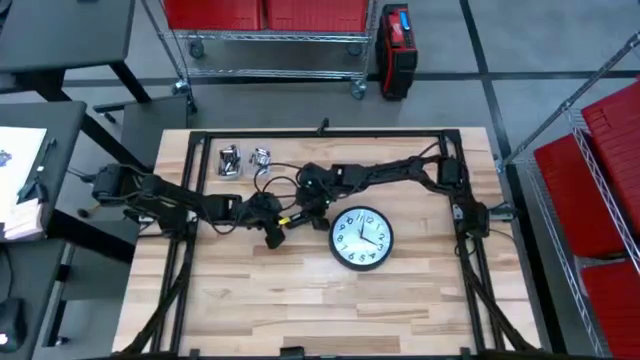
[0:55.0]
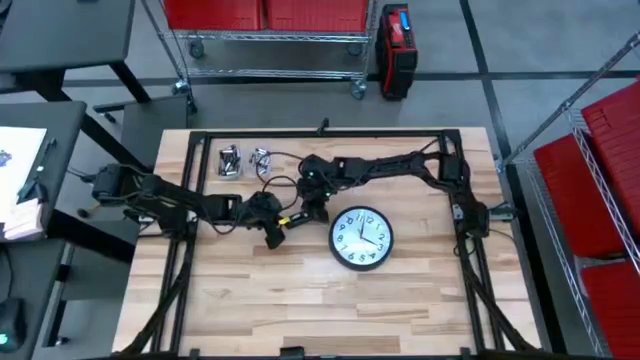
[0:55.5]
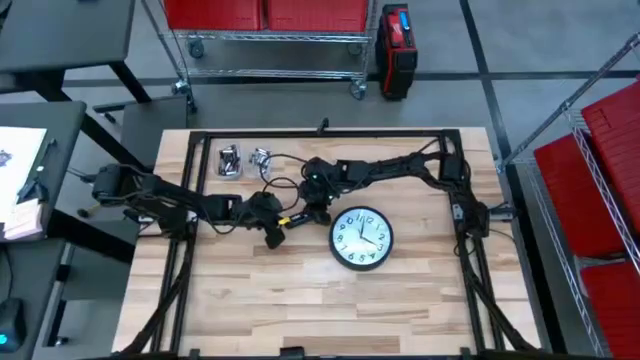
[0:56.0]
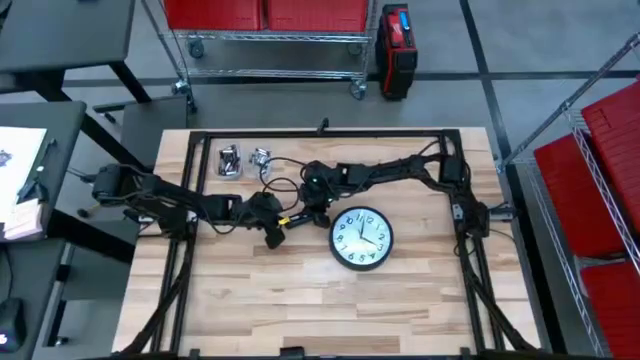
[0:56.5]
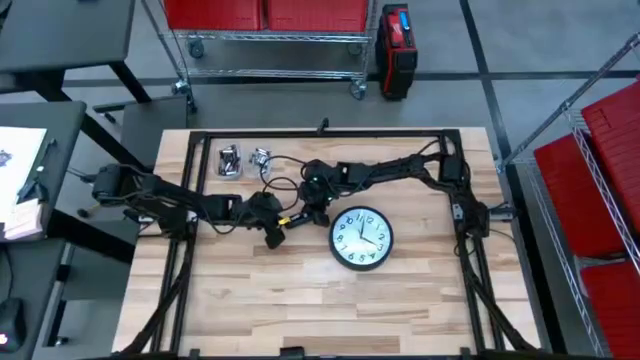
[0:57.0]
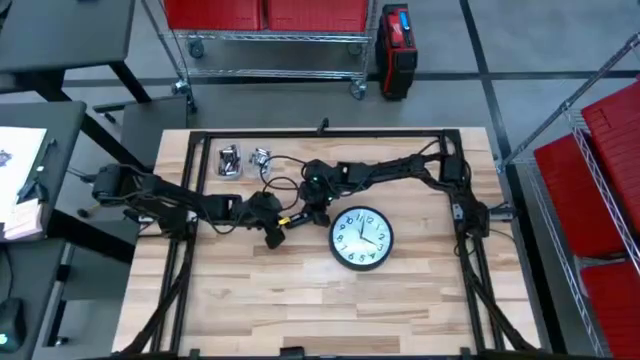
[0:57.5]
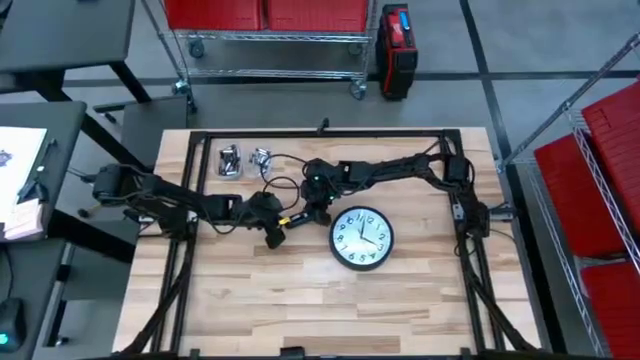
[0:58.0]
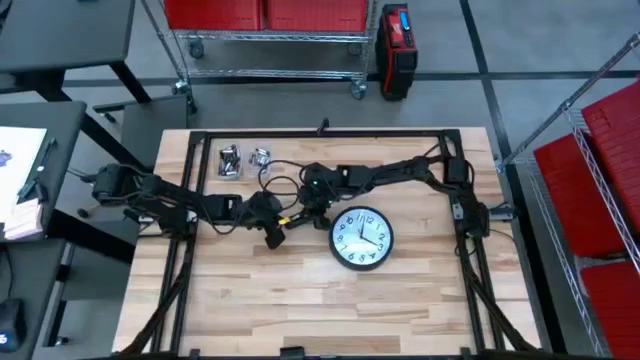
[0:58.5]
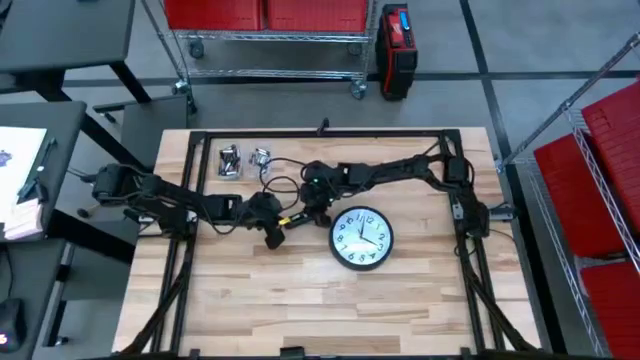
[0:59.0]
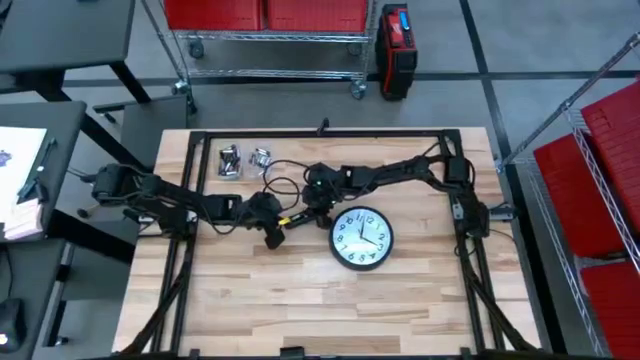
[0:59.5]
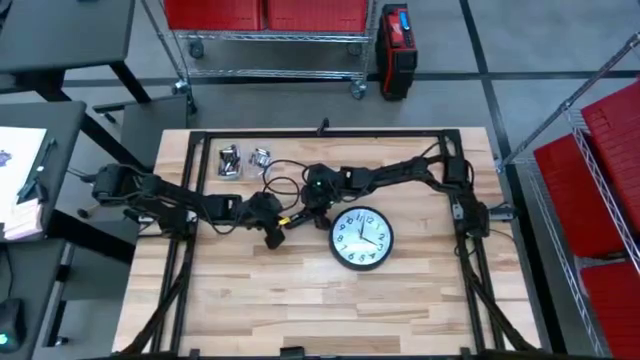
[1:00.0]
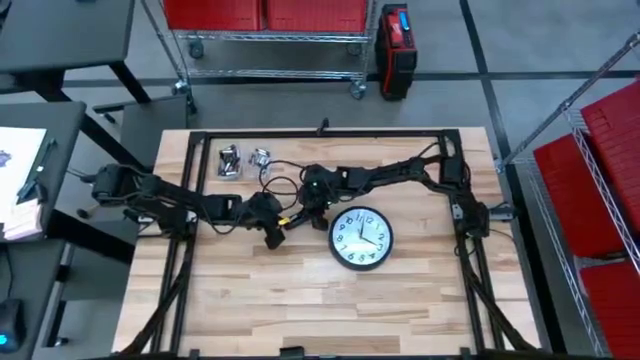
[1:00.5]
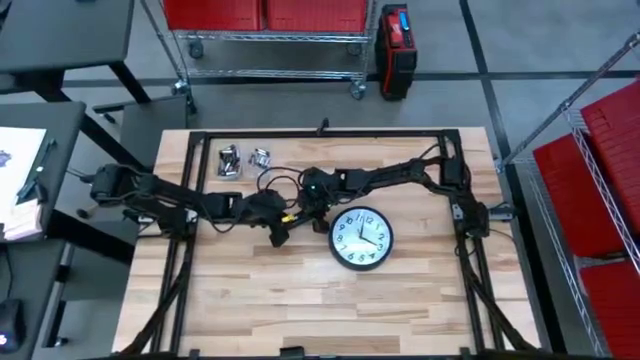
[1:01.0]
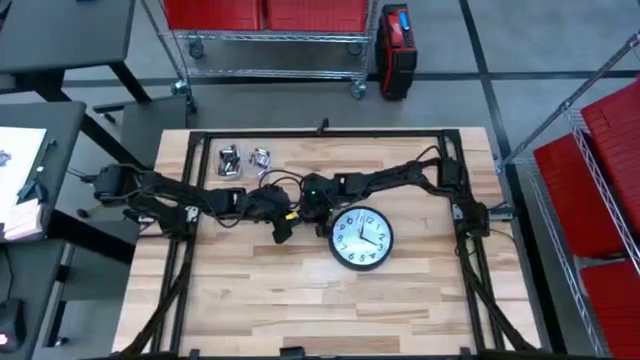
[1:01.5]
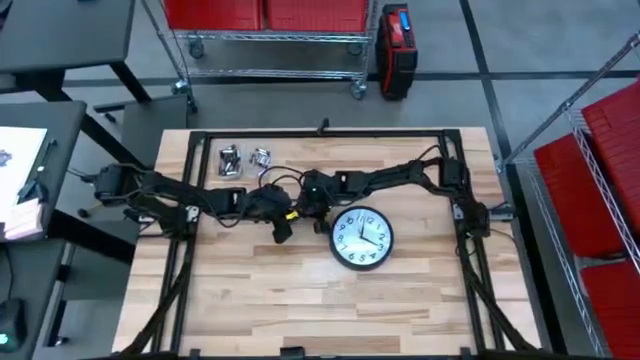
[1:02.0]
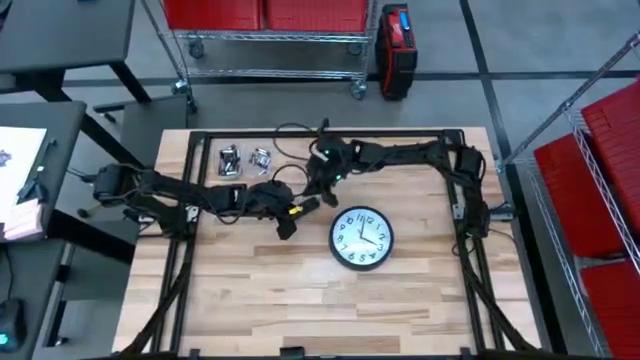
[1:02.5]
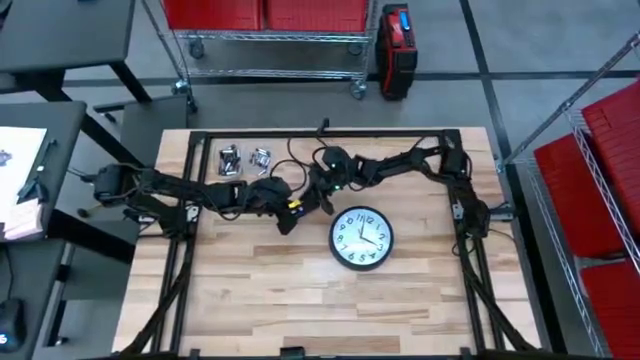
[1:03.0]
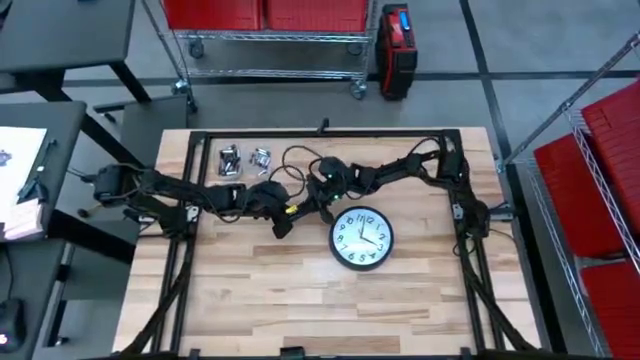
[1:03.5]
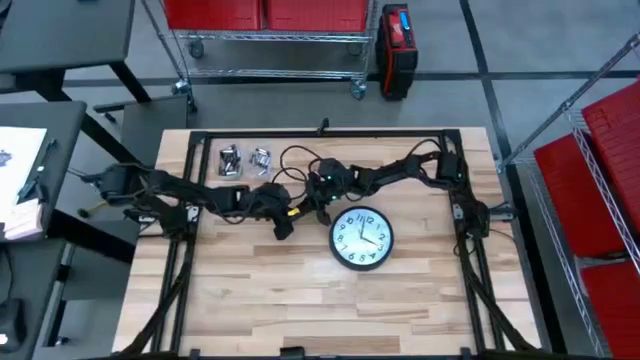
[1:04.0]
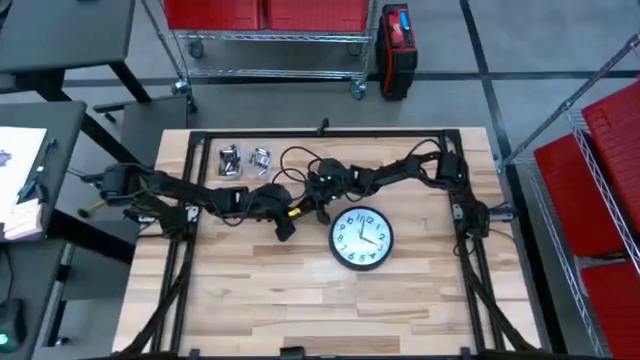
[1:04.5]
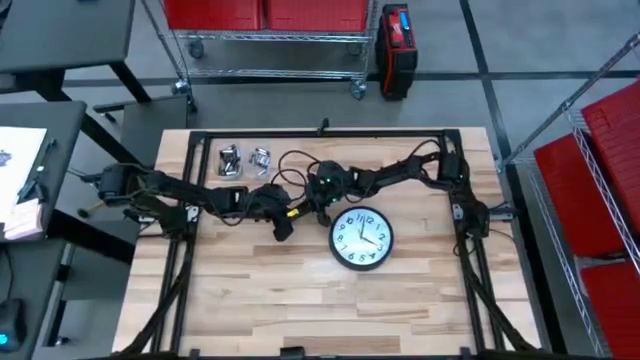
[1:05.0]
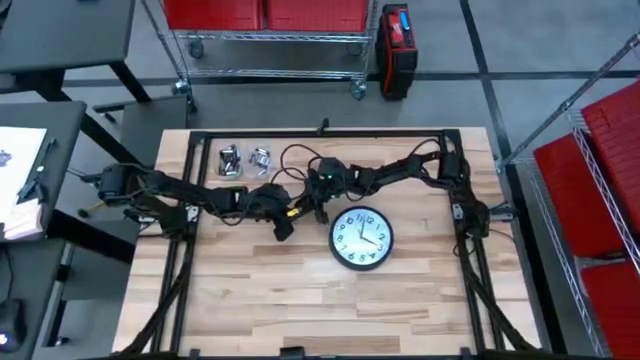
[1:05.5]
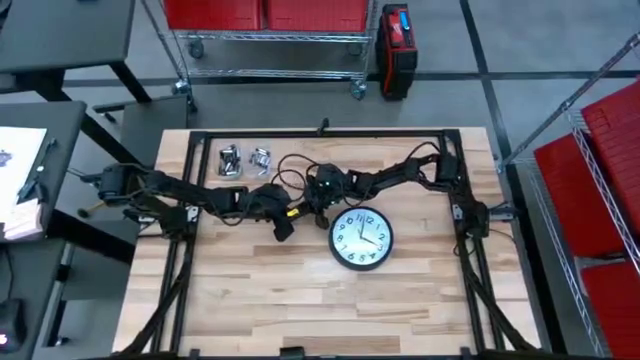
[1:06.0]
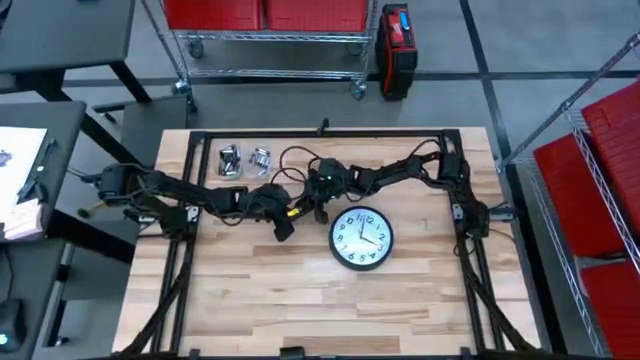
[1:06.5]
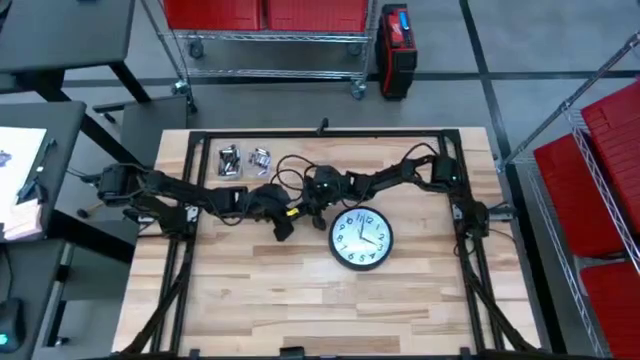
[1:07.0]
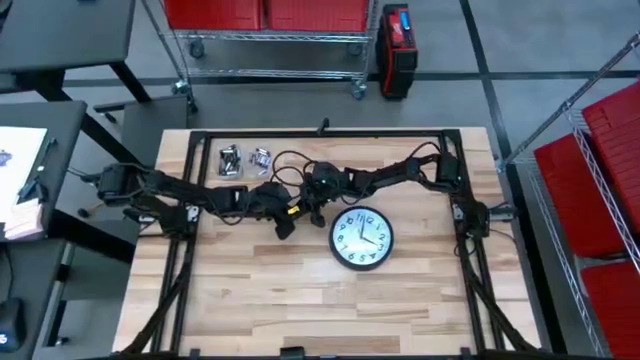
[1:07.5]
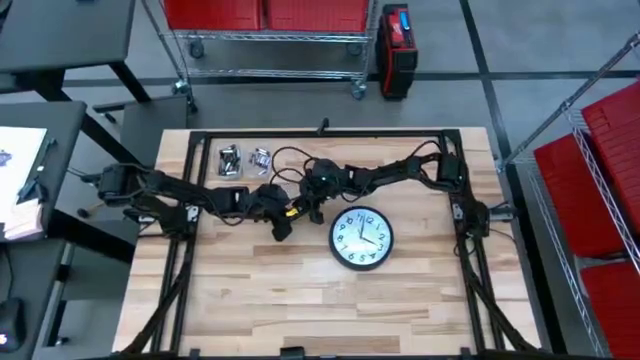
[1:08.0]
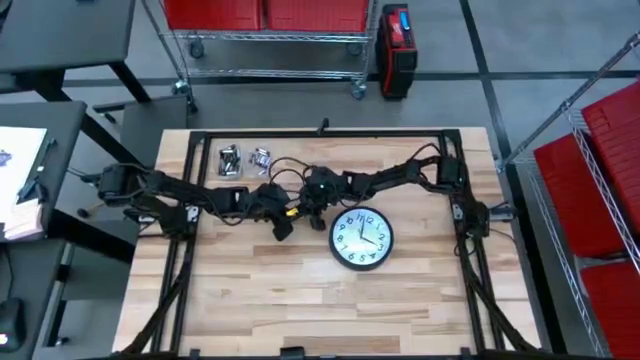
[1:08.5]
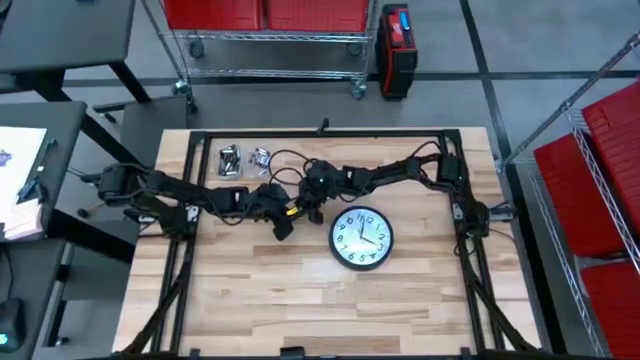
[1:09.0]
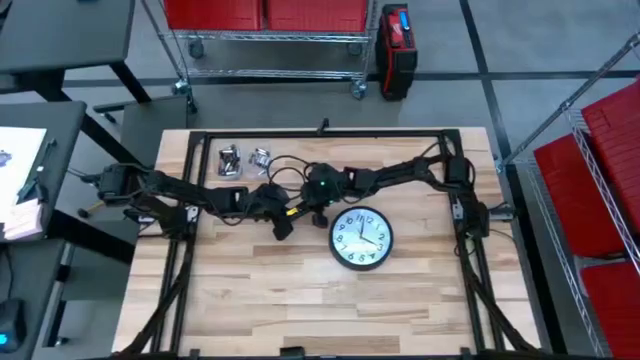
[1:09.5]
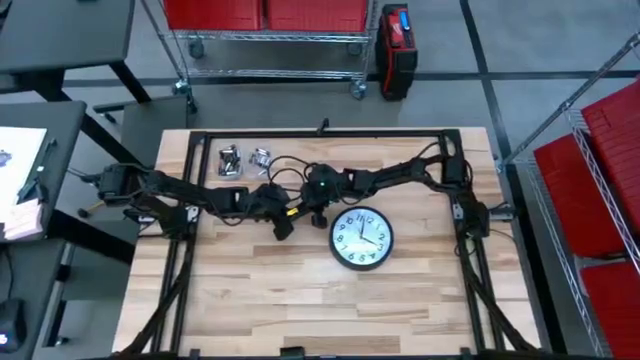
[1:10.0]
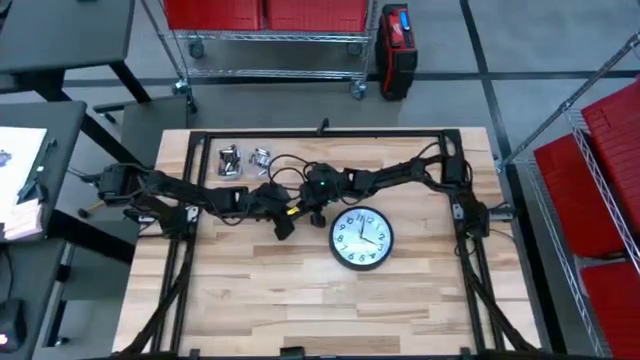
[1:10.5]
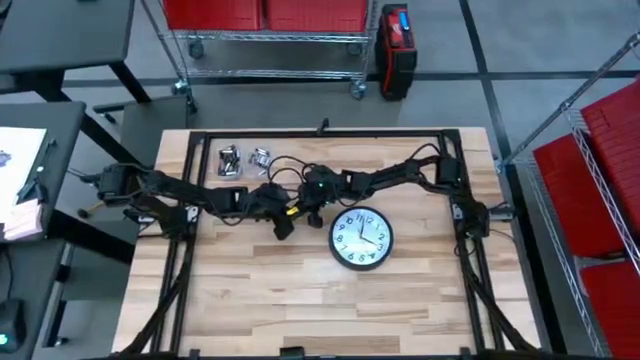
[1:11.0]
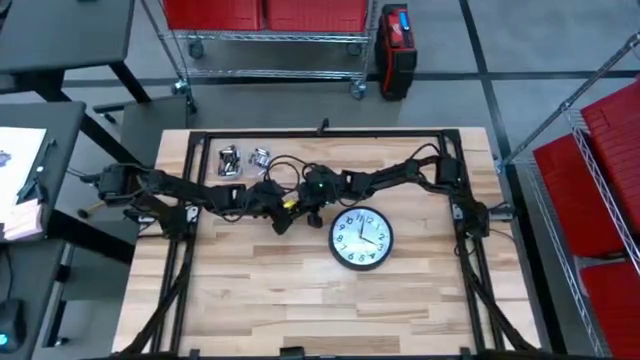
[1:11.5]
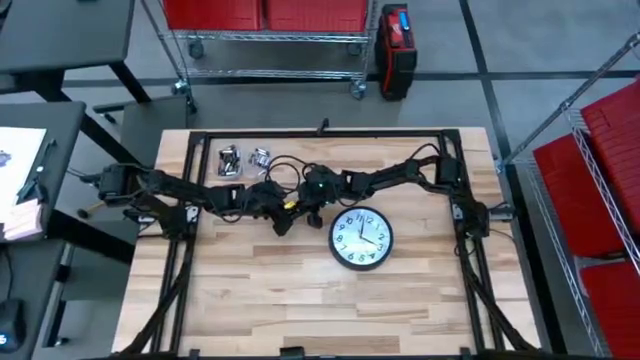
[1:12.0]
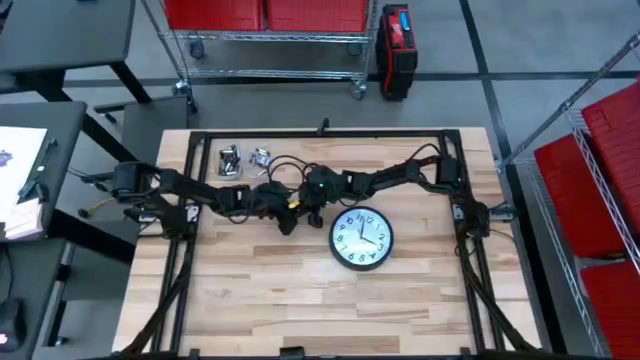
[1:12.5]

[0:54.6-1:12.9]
Task: Insert battery
Insert the silver battery into the remote
